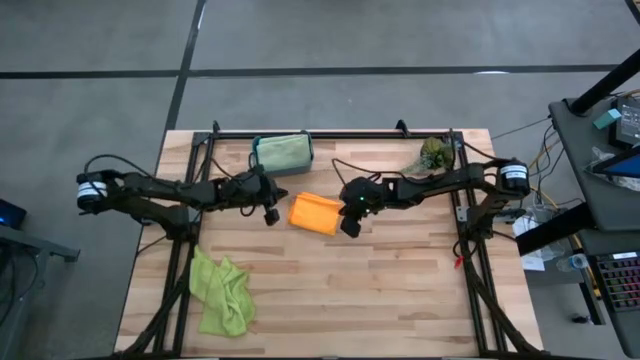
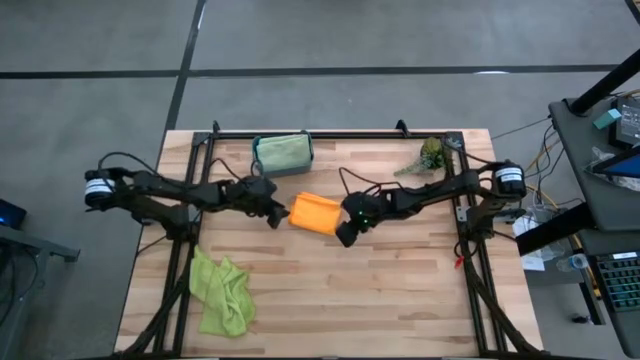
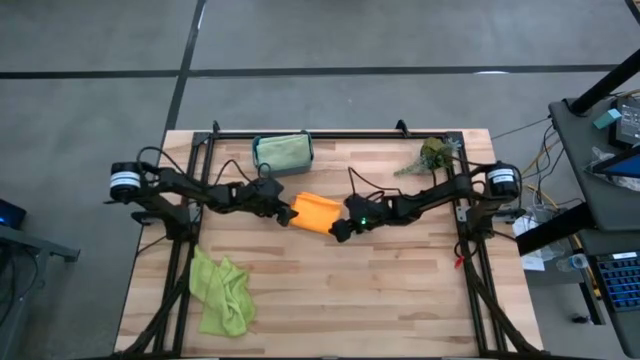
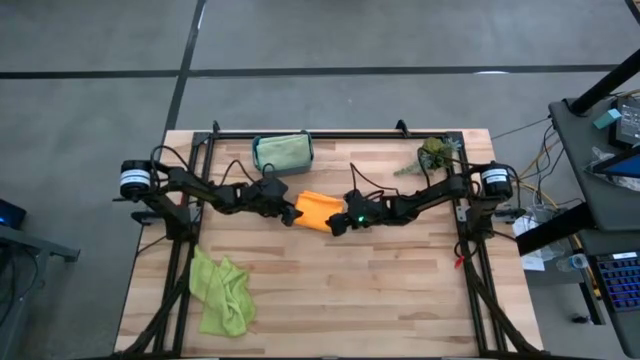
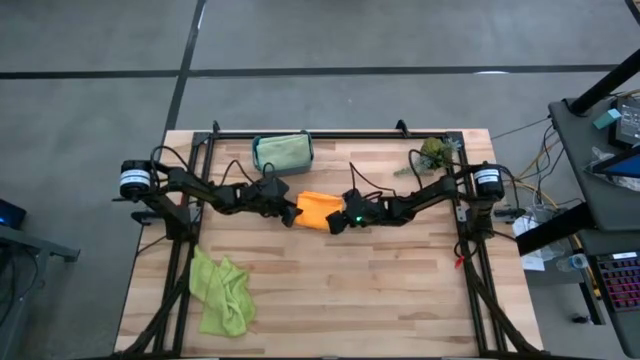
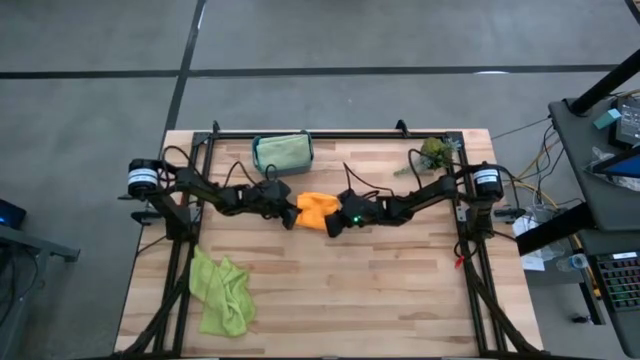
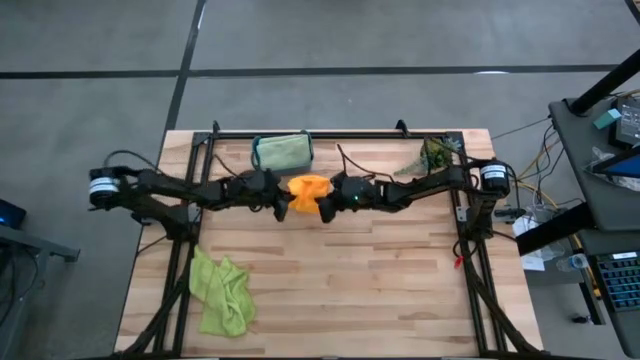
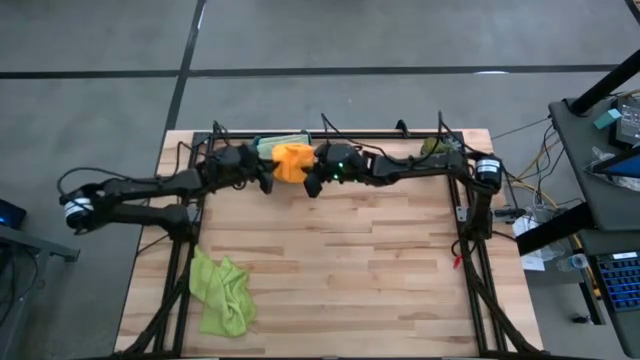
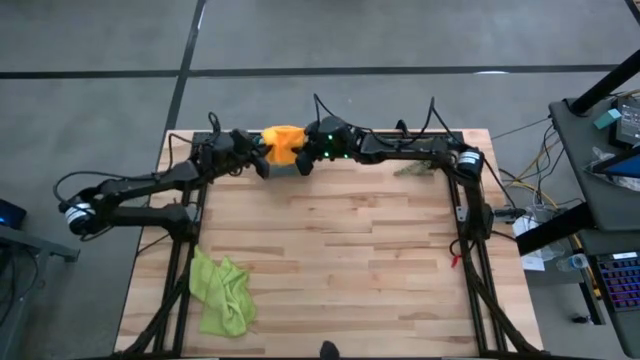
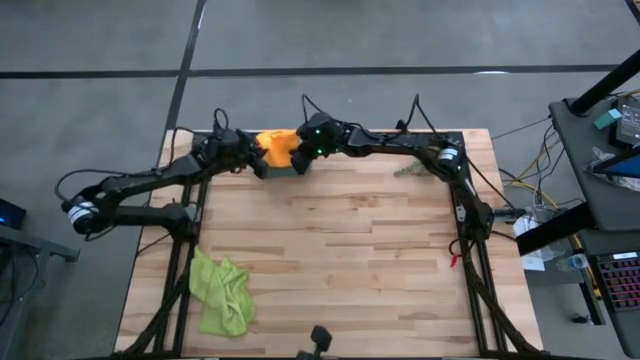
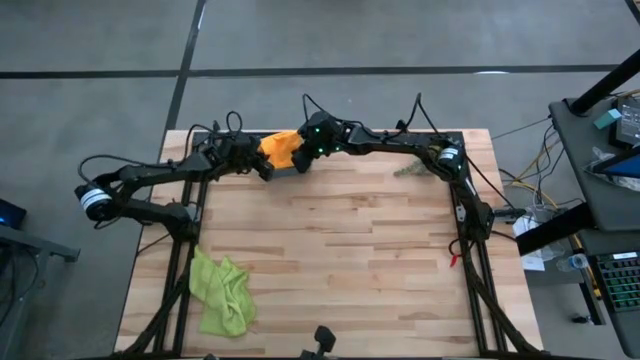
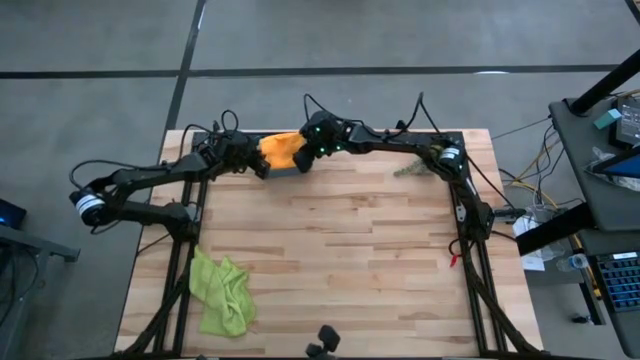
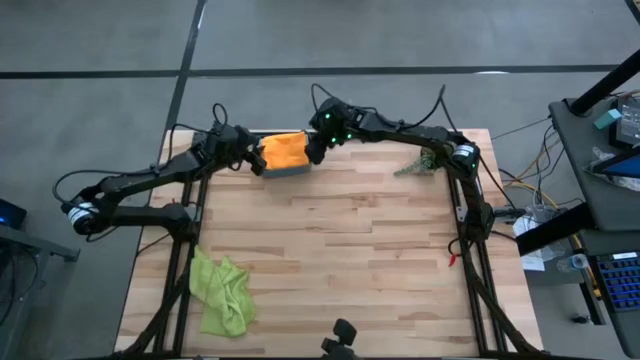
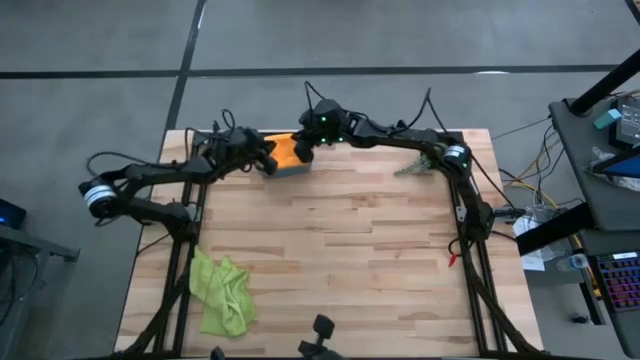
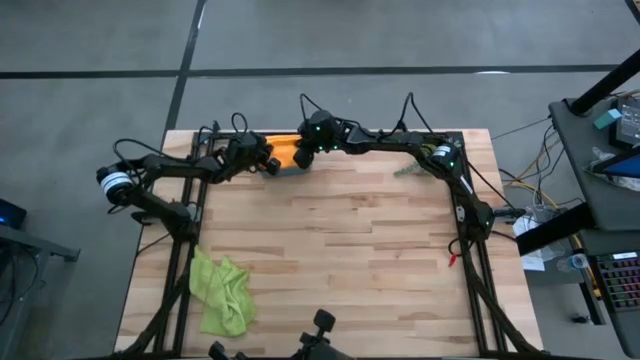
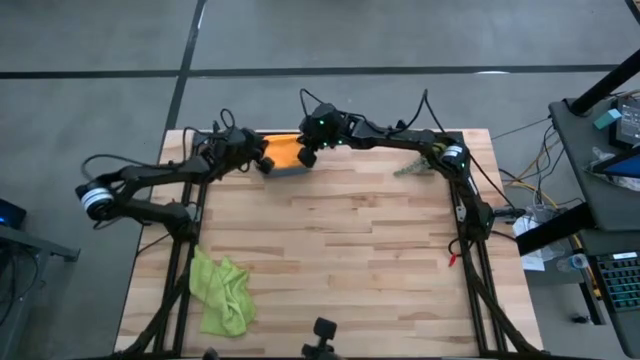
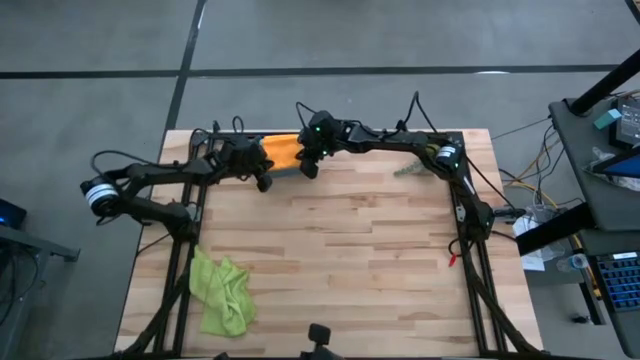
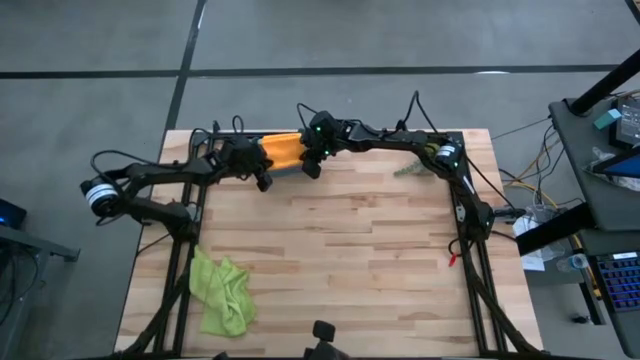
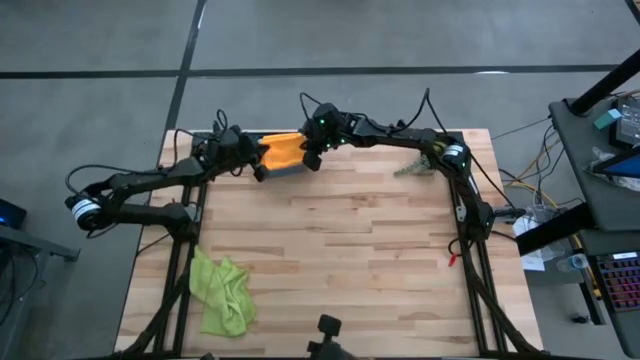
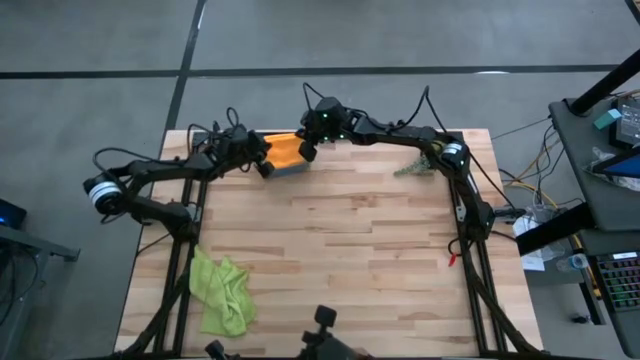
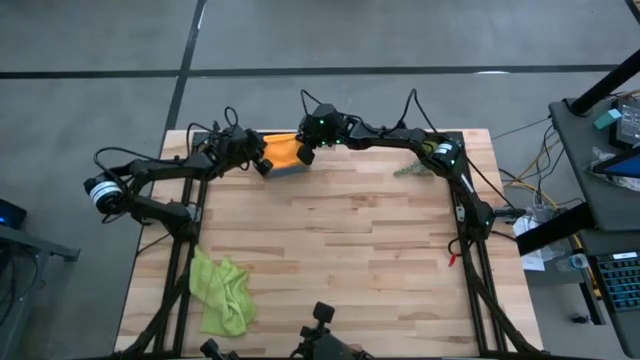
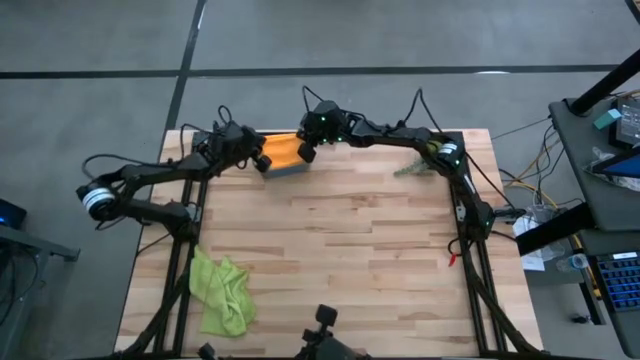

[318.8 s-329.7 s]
Task: Fold microfiber towels
Put the orange microfiber towel into the green bin

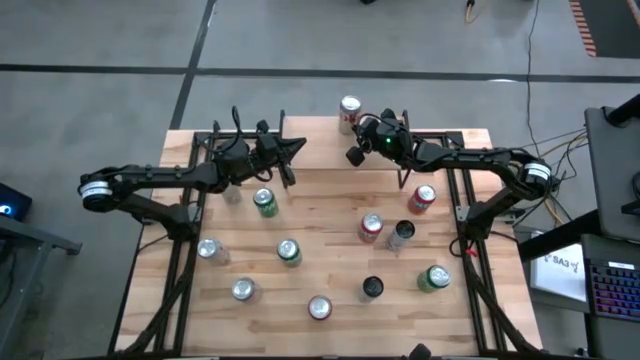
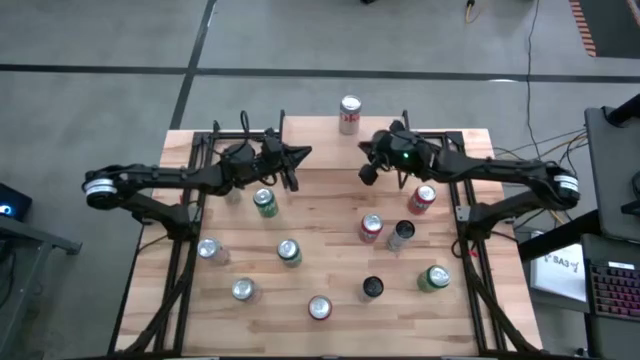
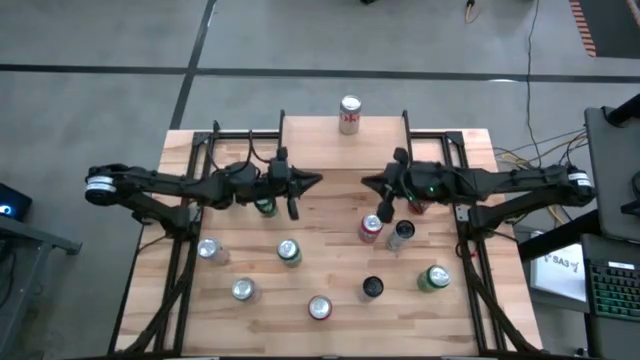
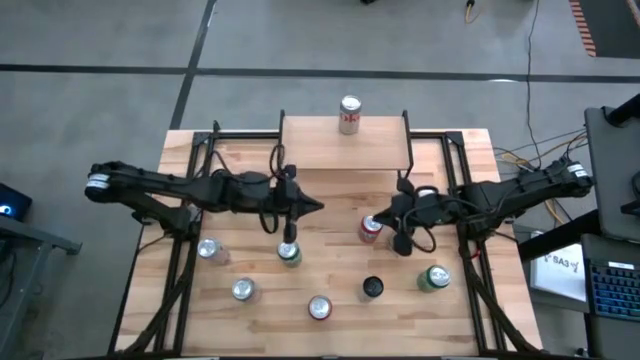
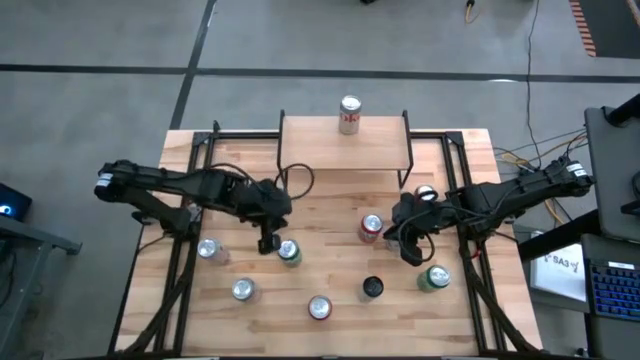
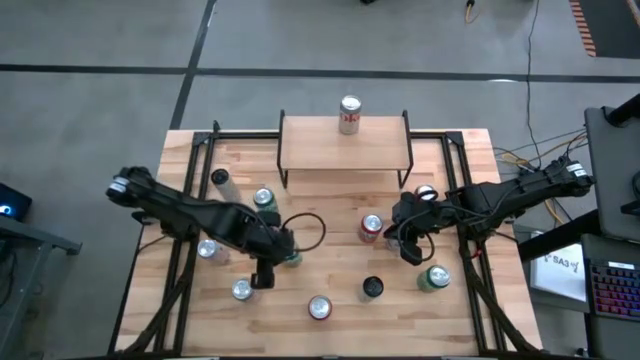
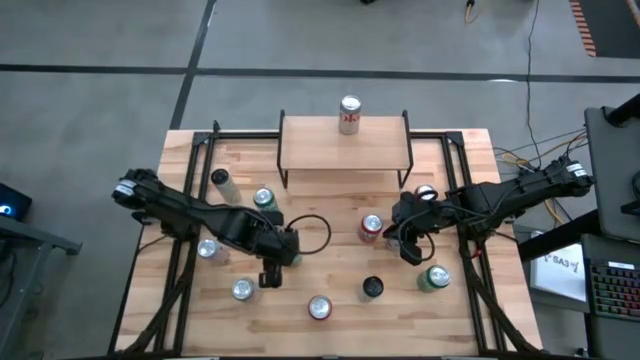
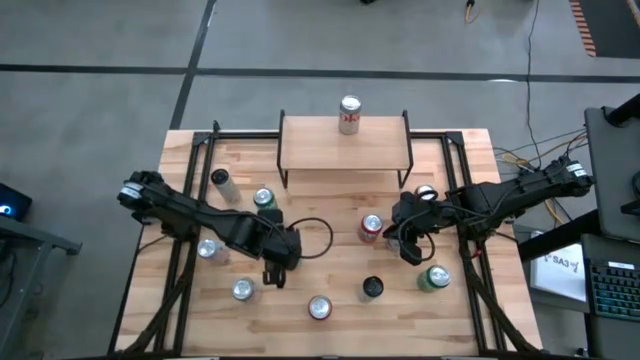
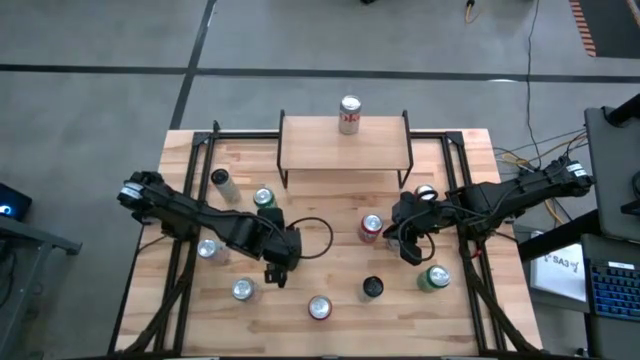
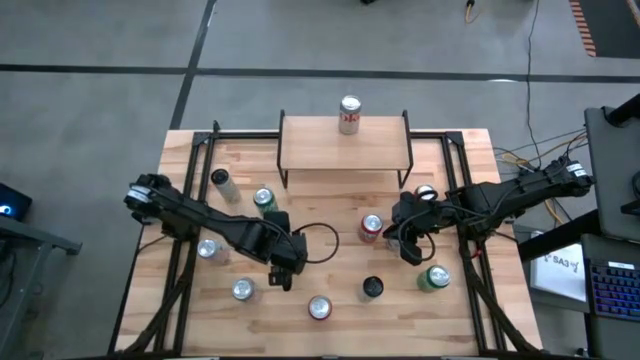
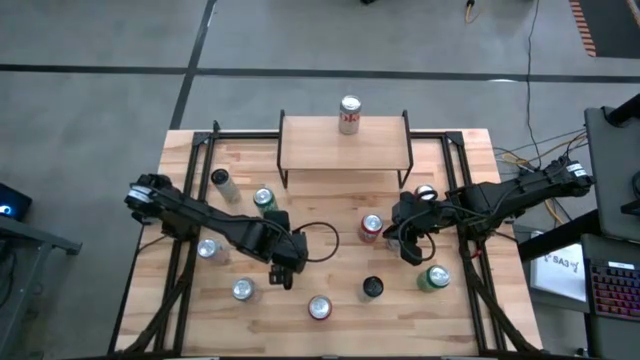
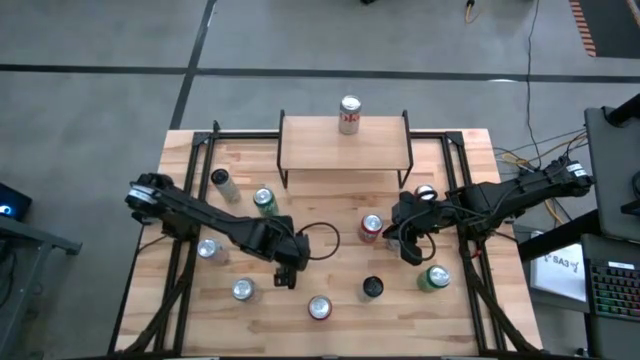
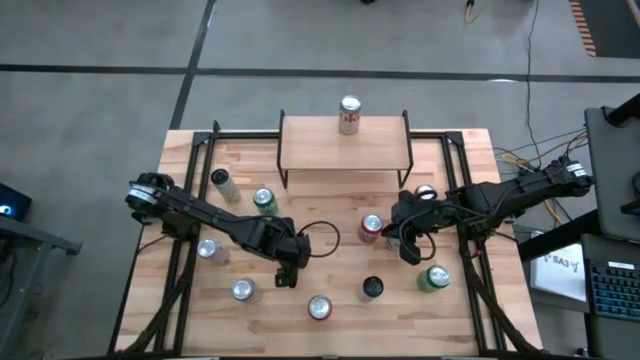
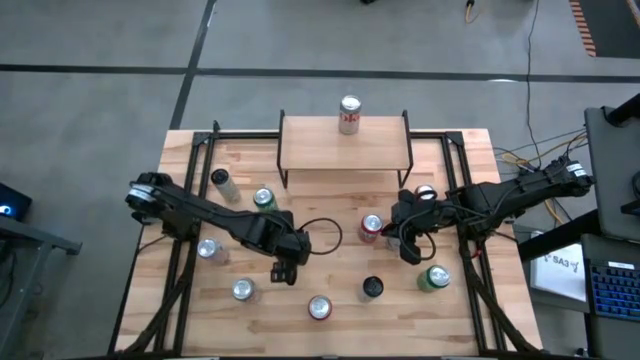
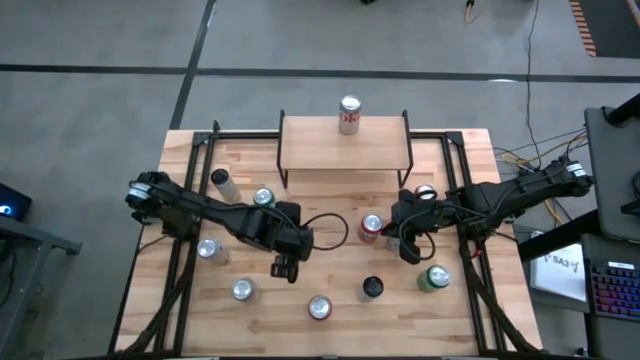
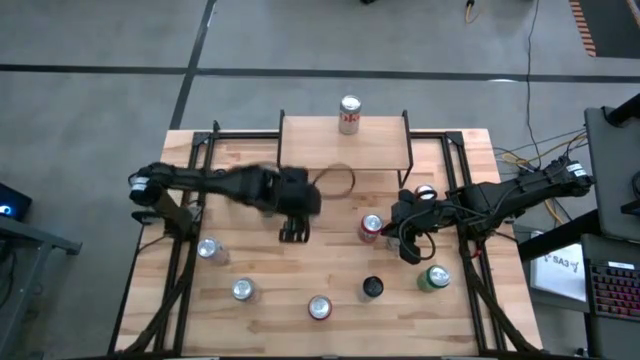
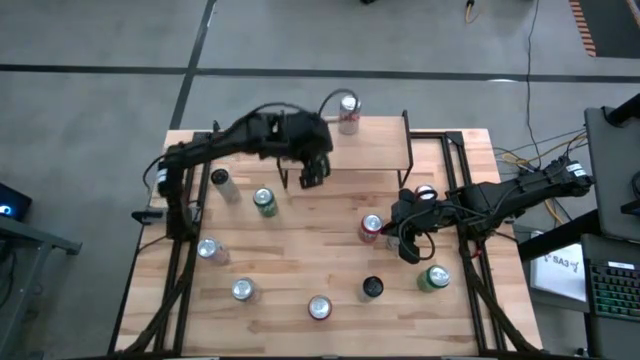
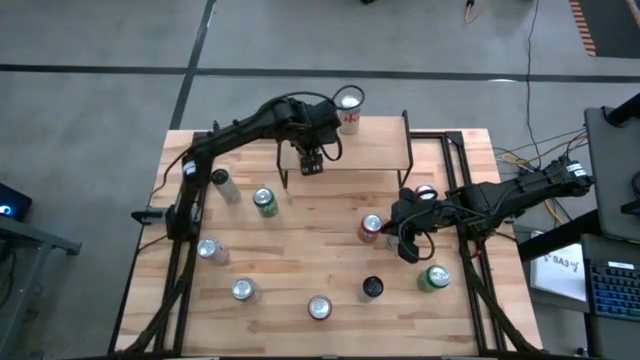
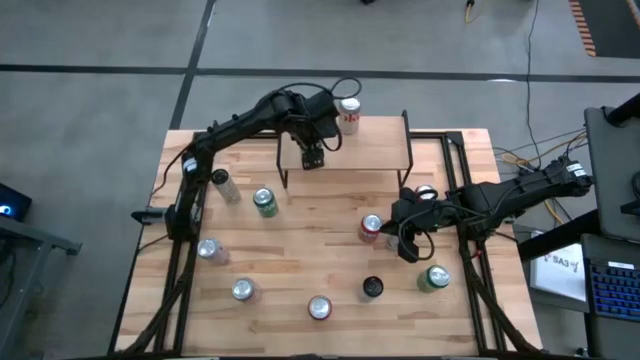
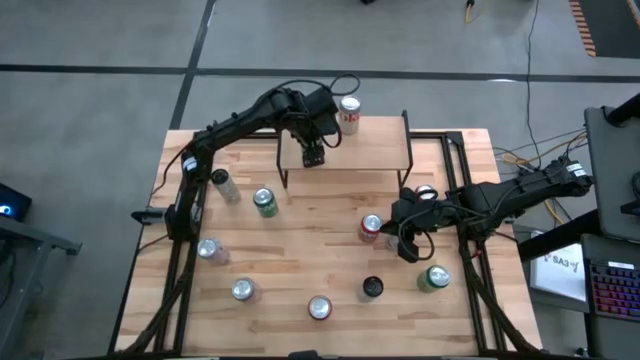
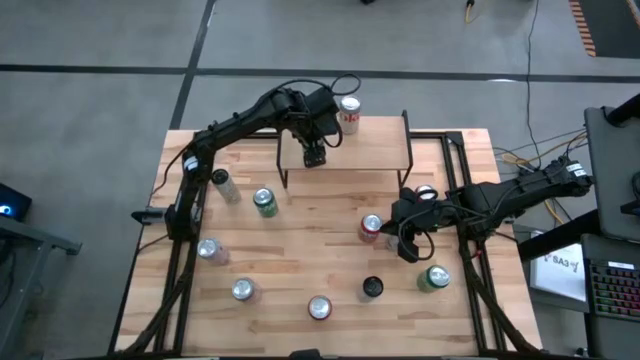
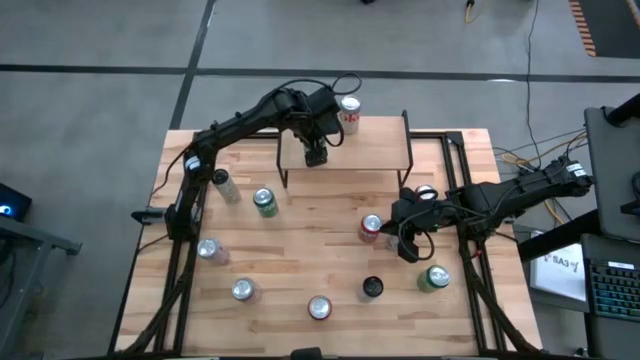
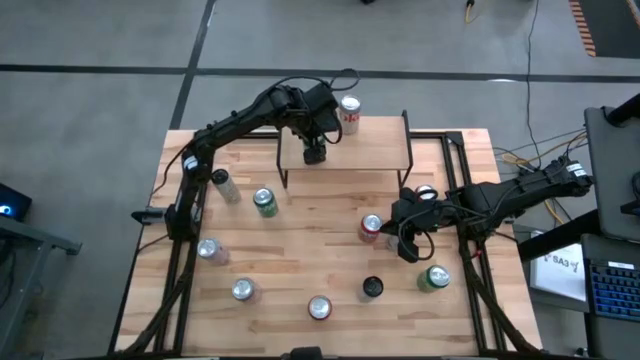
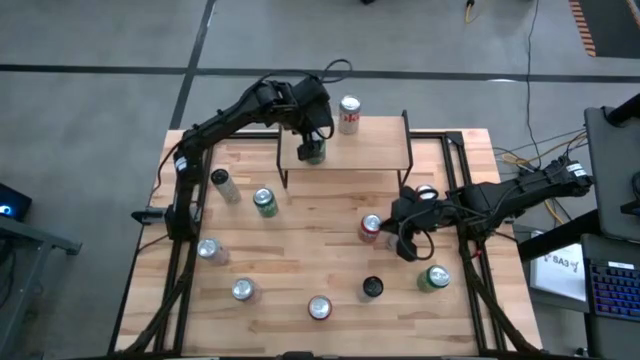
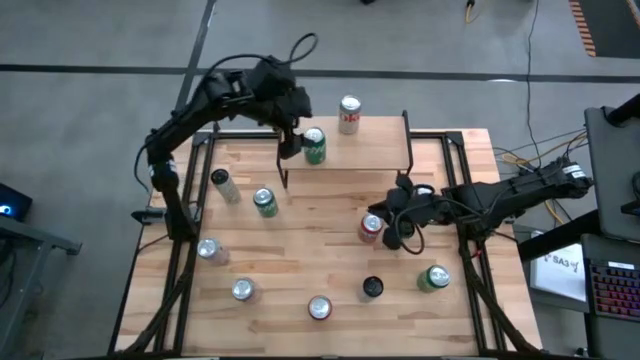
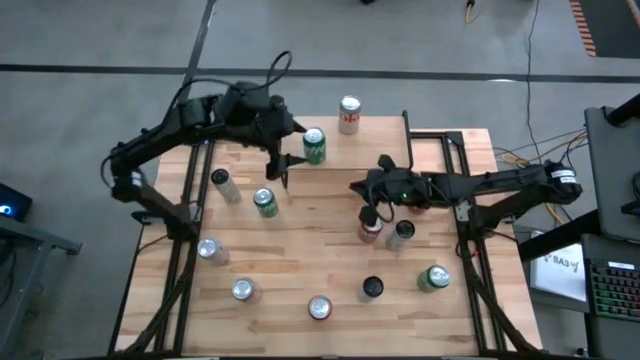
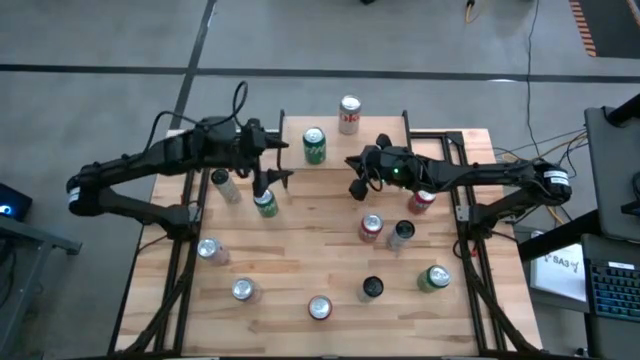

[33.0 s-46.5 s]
Task: Place canned beverage on shelf
Put the middle green soda can on the shelf
